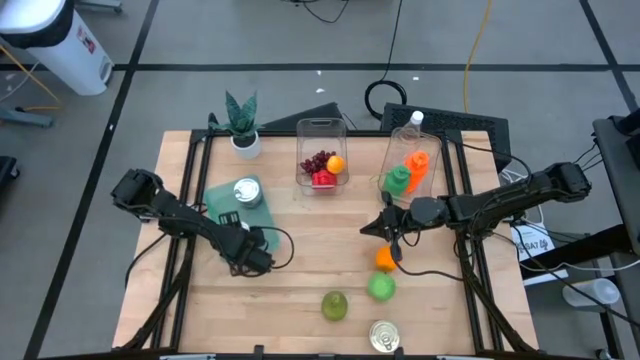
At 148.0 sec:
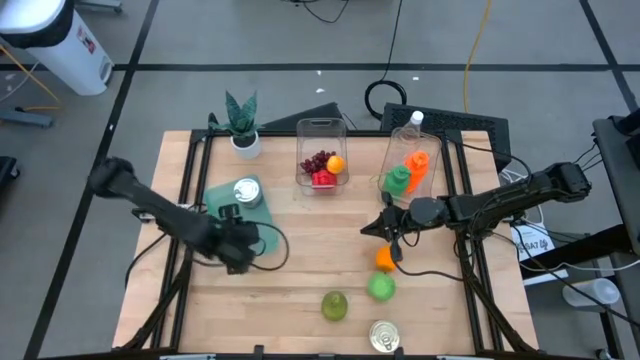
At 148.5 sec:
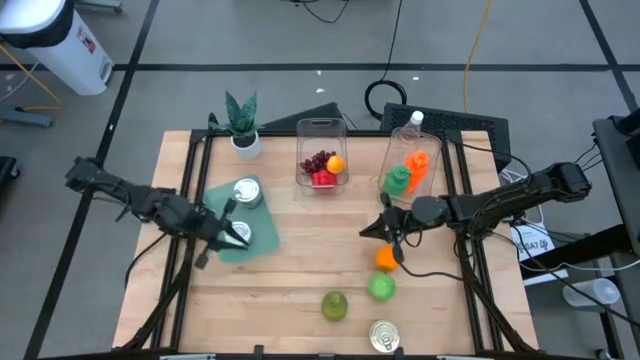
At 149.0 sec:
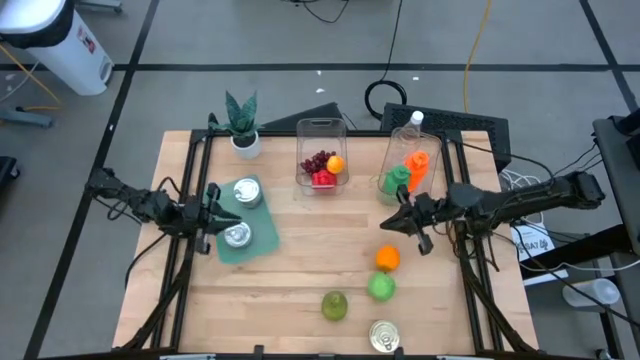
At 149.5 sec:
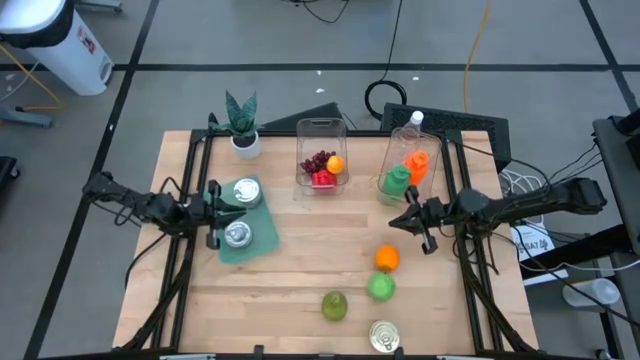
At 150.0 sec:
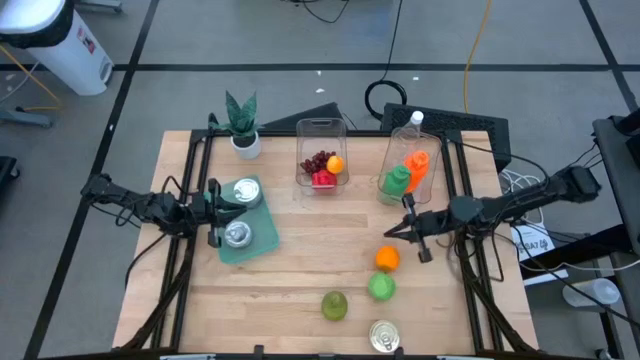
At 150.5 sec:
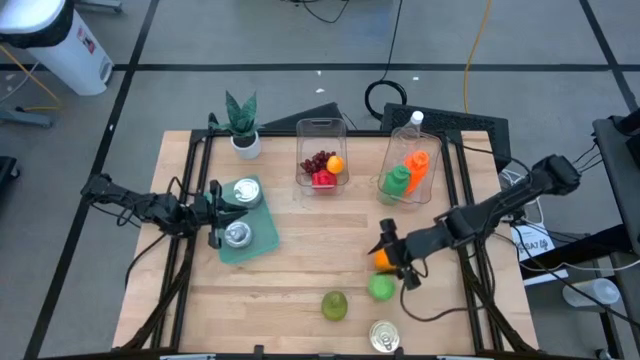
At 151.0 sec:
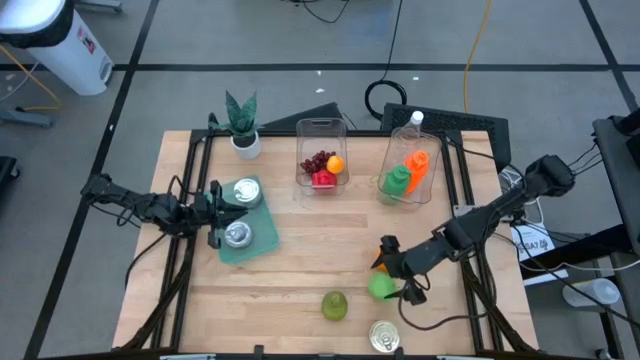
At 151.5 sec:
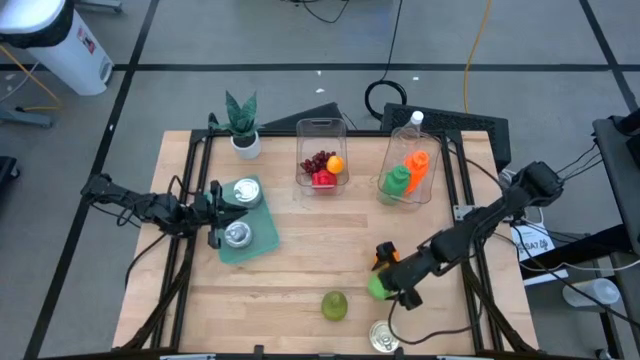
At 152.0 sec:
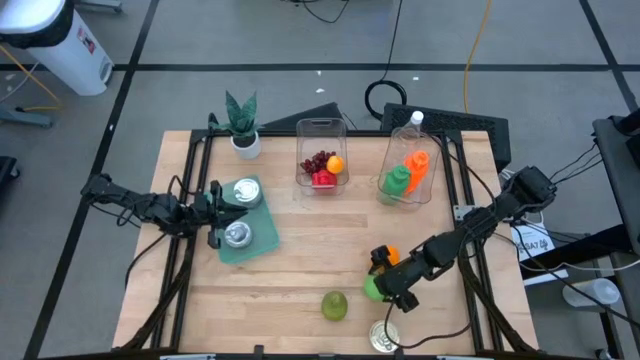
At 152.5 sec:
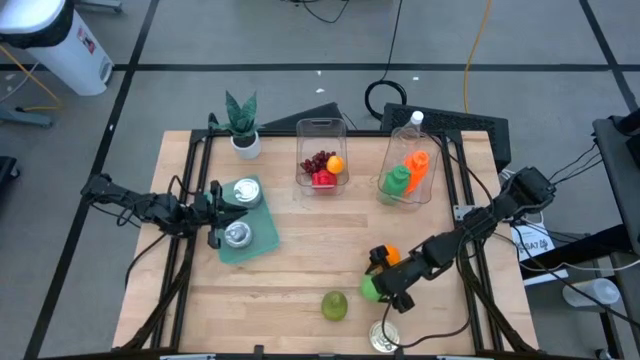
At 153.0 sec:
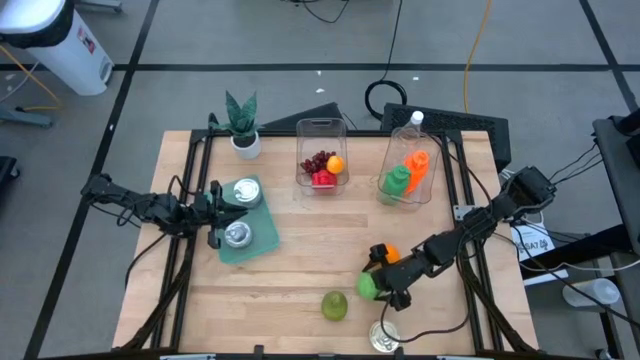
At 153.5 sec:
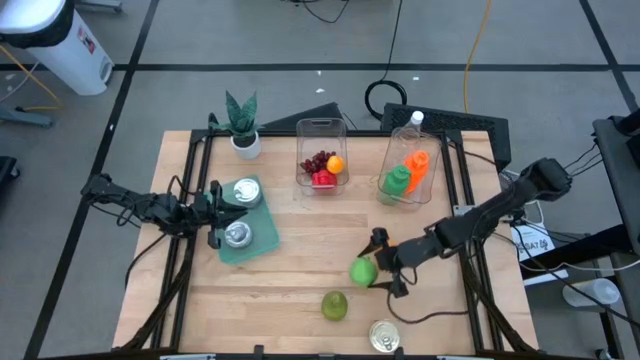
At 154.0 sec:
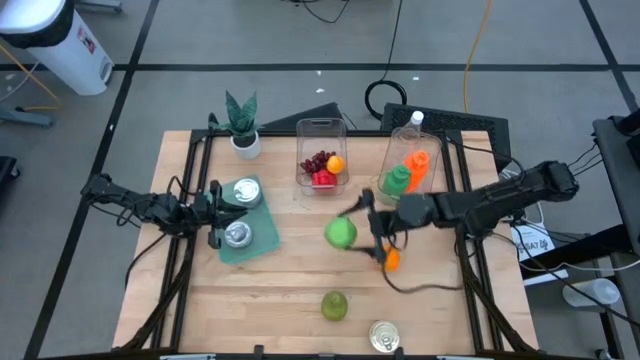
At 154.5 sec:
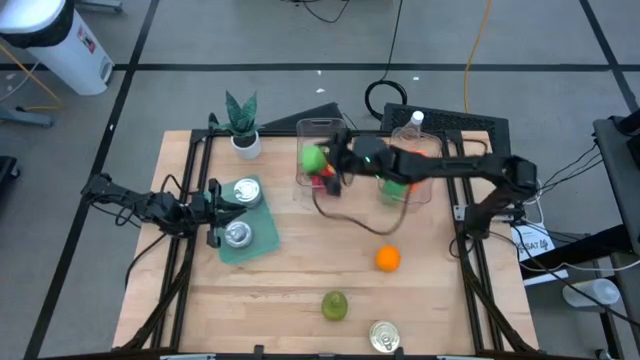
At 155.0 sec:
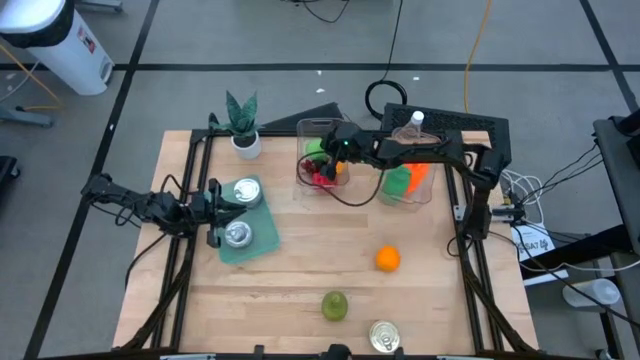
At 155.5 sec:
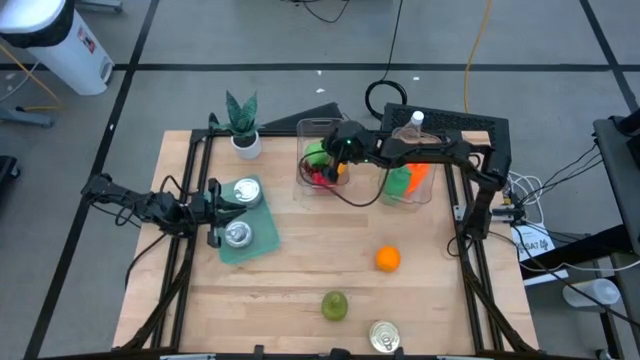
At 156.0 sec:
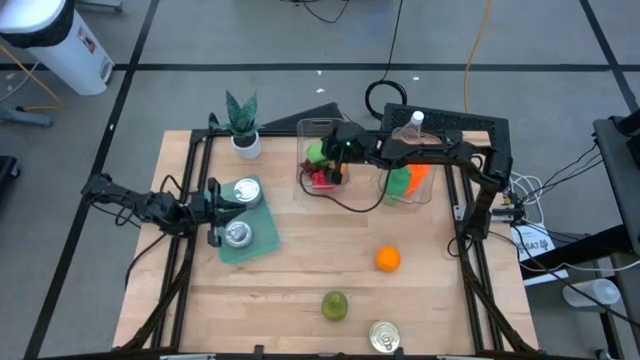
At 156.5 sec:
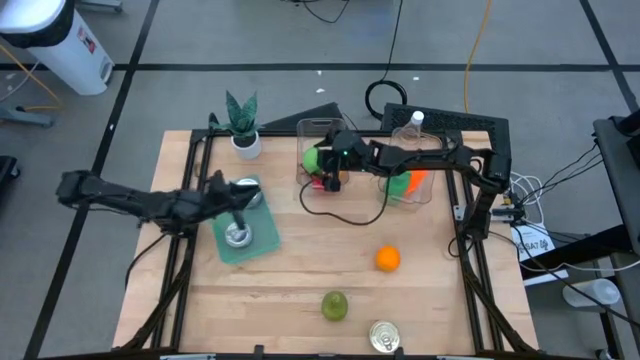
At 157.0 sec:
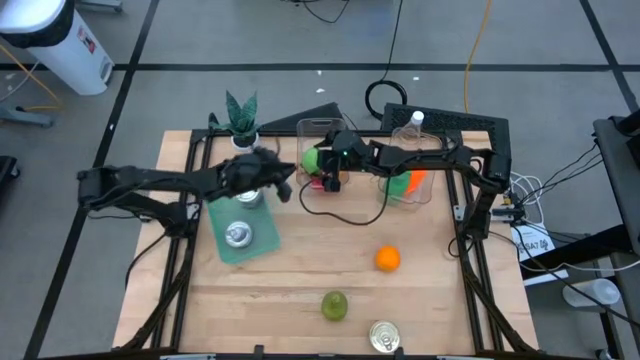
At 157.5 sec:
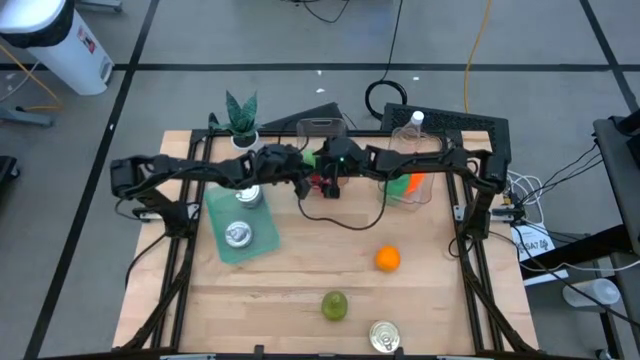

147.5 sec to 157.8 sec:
Task: Pick & Place Food Item
Put the green apple into the left transparent bin

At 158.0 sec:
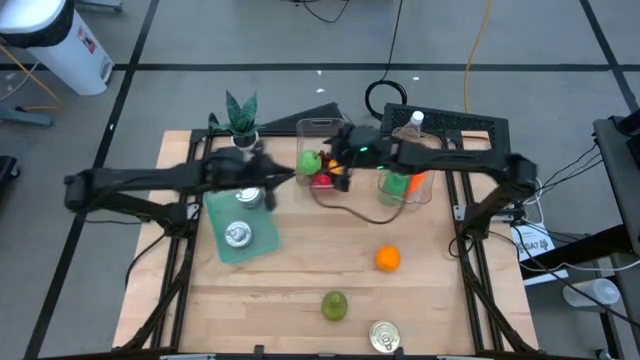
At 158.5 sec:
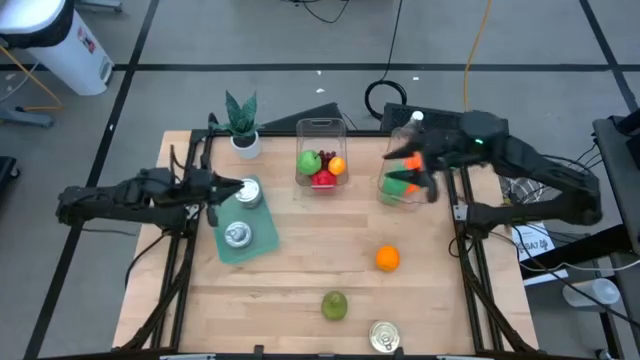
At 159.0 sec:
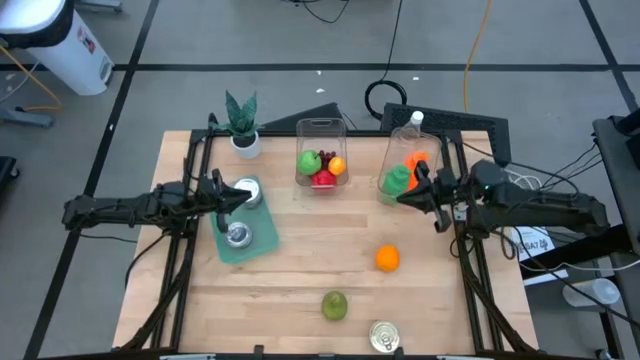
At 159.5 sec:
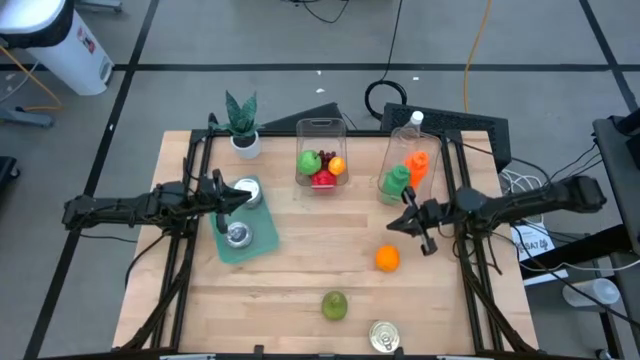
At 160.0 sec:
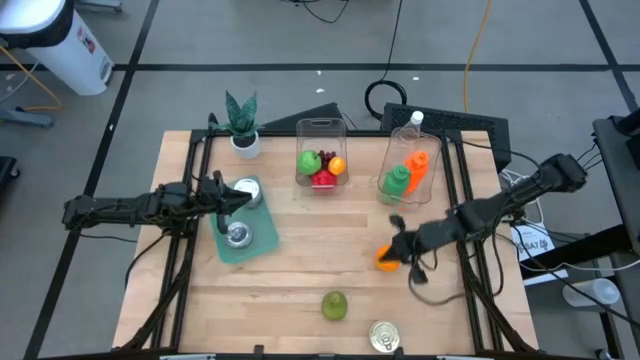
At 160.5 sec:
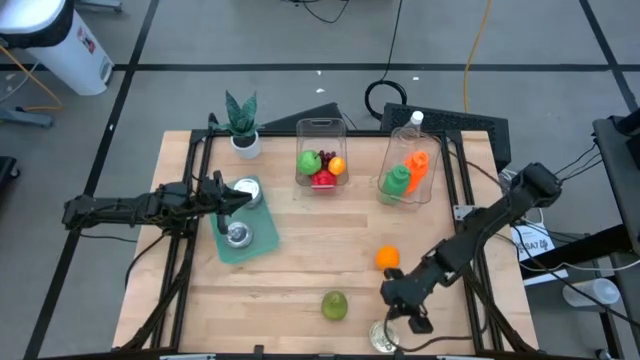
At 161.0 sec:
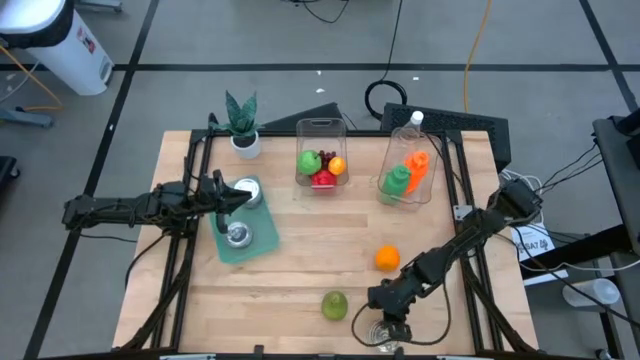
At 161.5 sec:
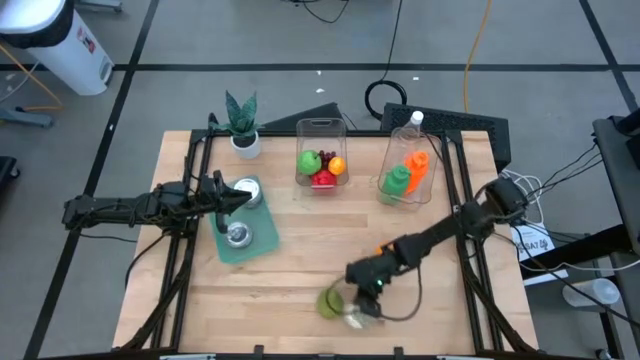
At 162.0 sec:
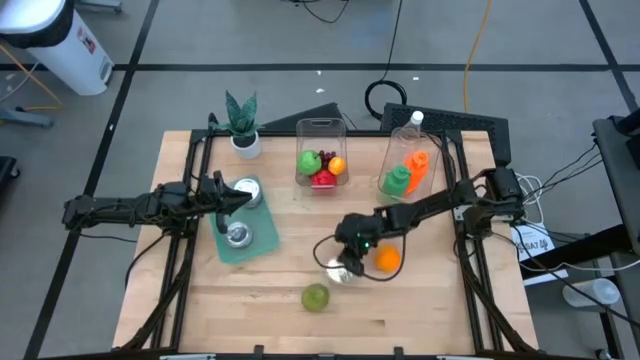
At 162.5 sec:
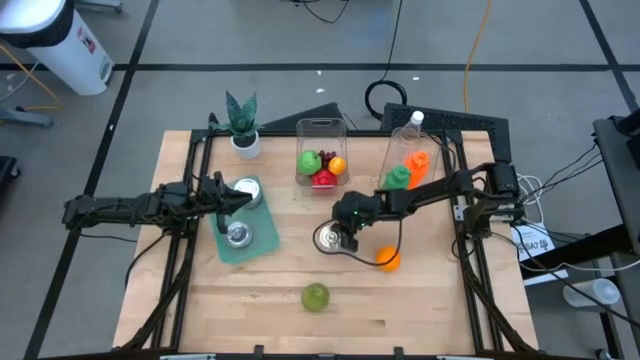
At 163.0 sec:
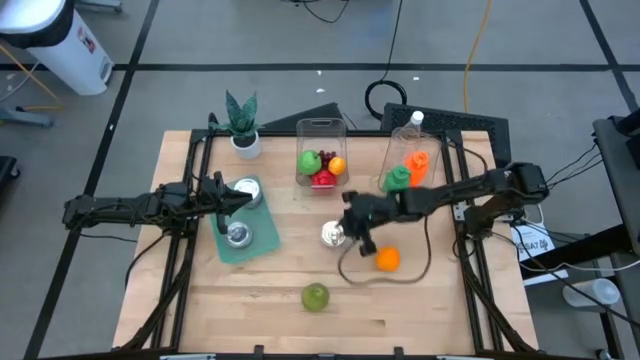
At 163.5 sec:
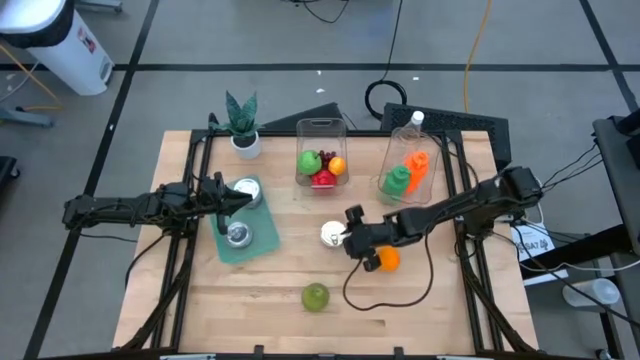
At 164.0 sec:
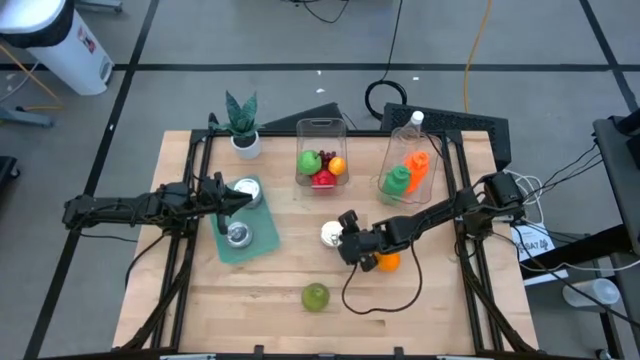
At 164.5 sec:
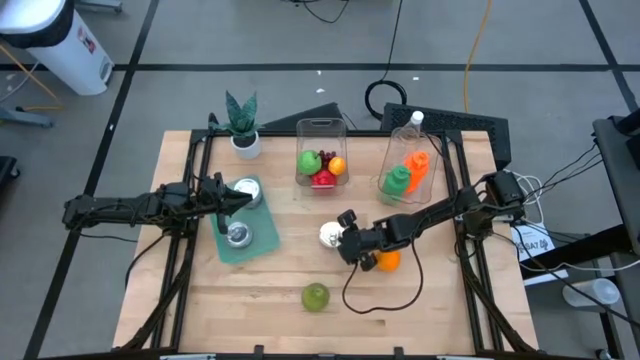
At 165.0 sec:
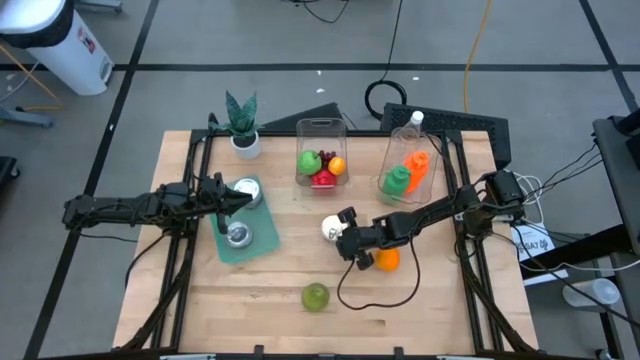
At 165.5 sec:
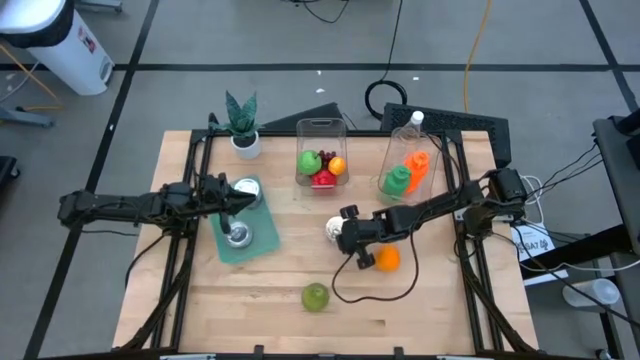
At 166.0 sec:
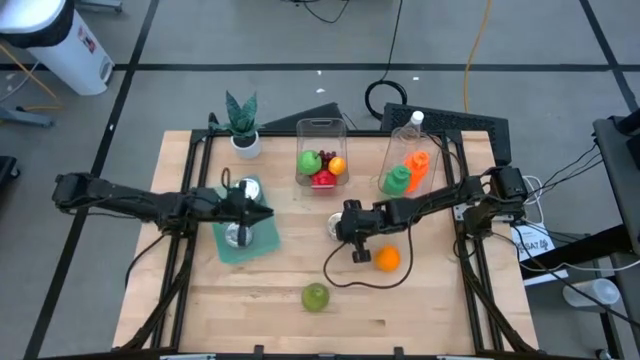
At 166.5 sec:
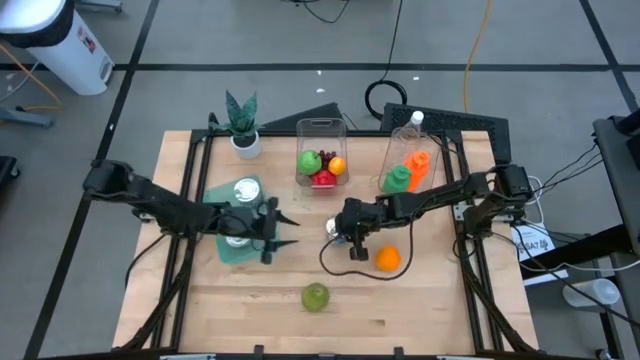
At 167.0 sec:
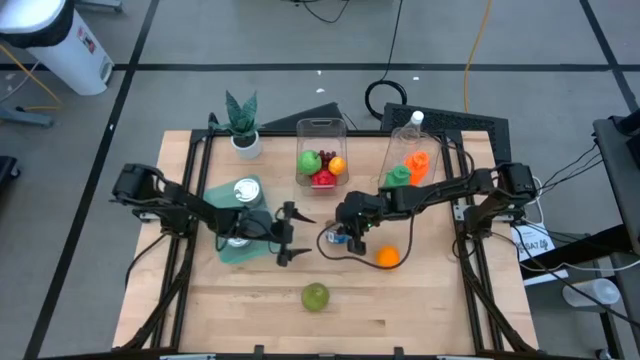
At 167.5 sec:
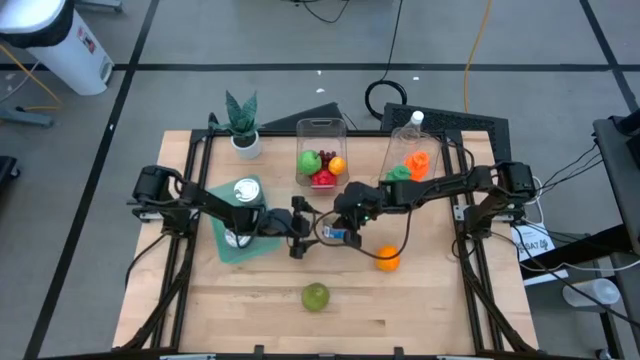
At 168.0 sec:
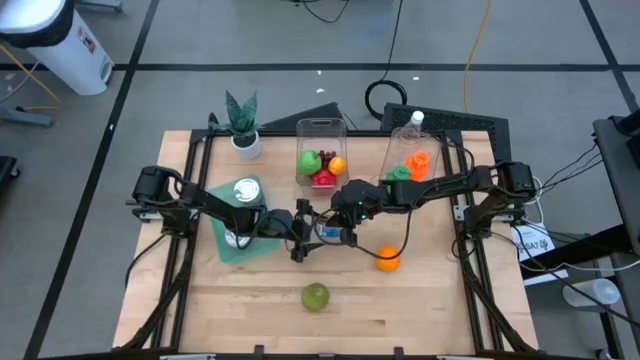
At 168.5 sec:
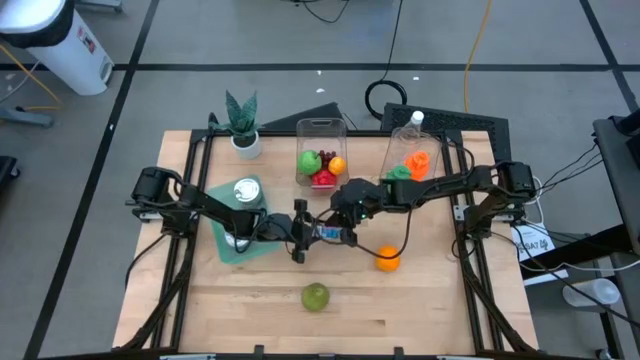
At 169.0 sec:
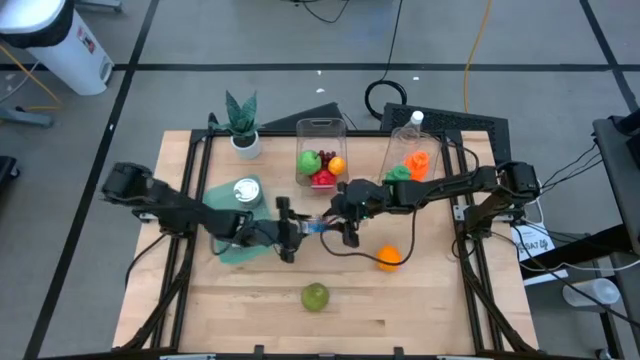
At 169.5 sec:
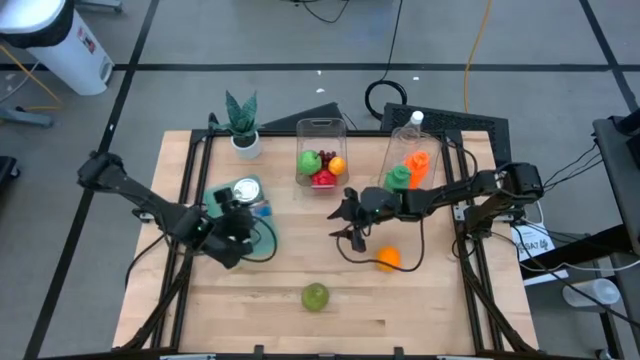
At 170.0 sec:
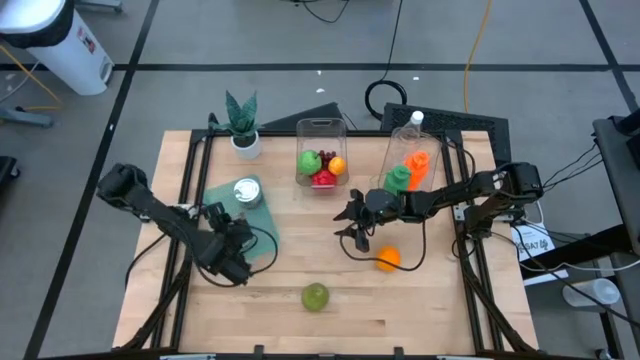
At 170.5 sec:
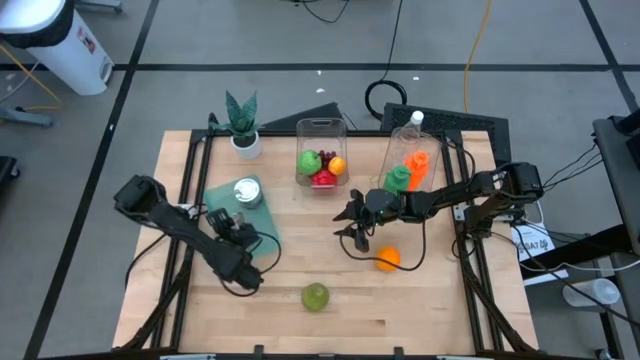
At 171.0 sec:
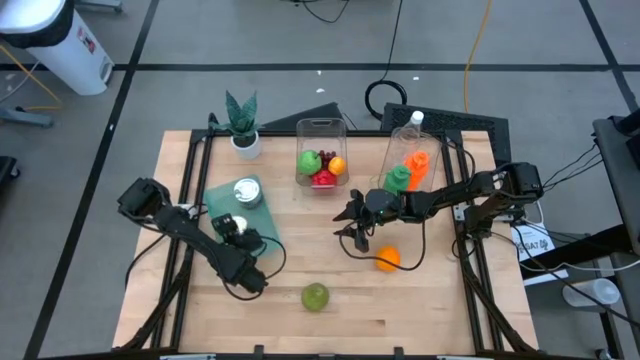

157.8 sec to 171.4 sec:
Stack the blue and pink tuna can on top of the green tuna can in the blue bin
